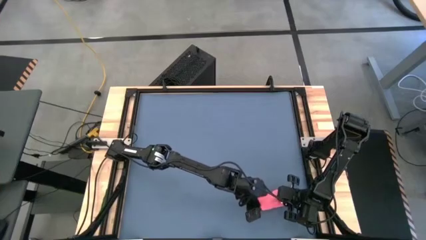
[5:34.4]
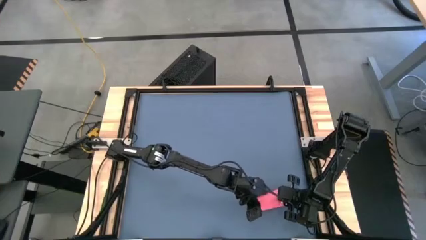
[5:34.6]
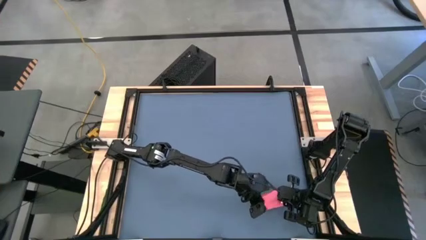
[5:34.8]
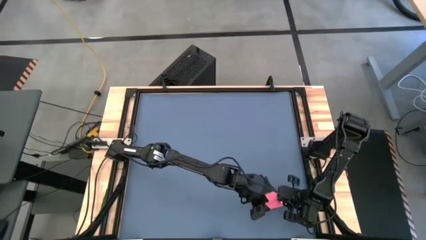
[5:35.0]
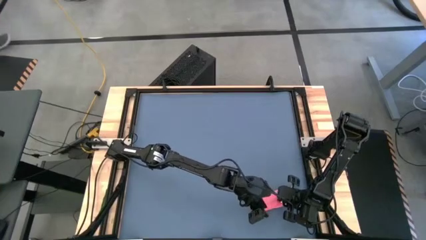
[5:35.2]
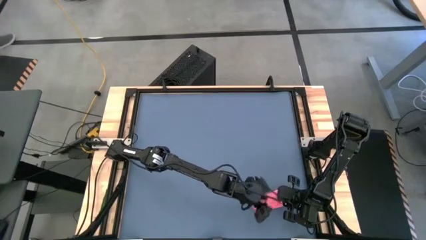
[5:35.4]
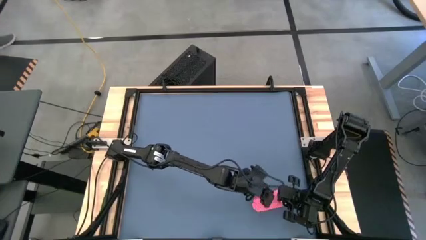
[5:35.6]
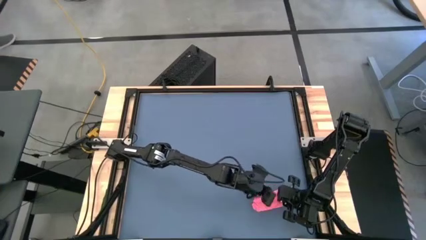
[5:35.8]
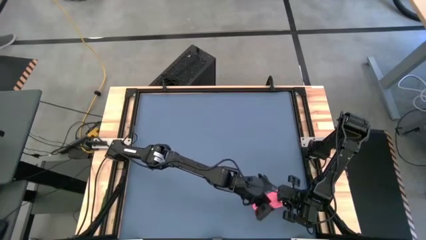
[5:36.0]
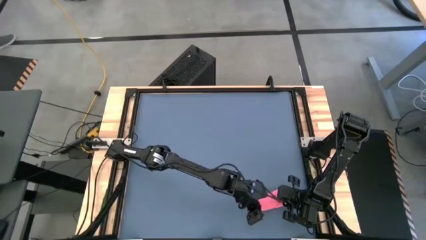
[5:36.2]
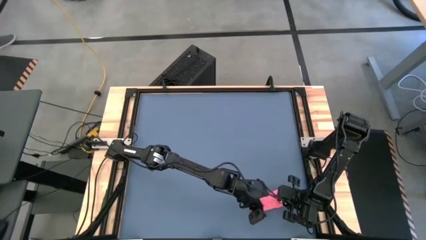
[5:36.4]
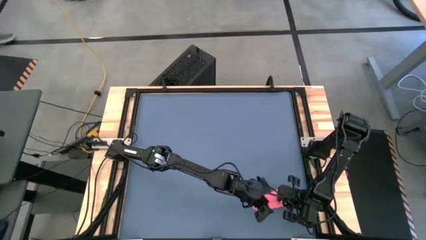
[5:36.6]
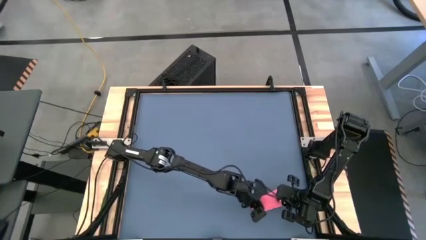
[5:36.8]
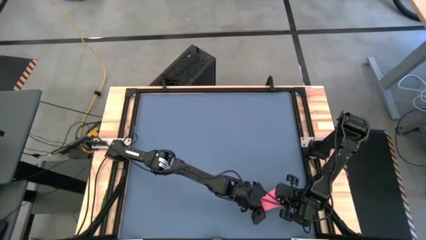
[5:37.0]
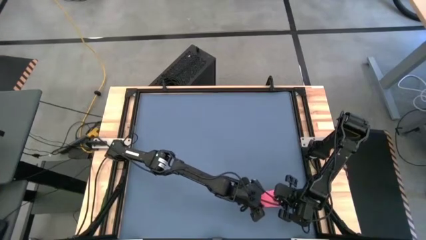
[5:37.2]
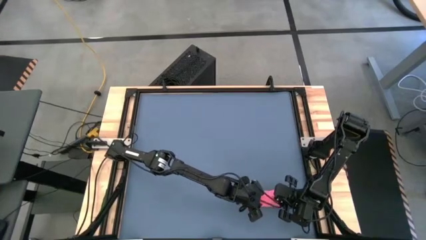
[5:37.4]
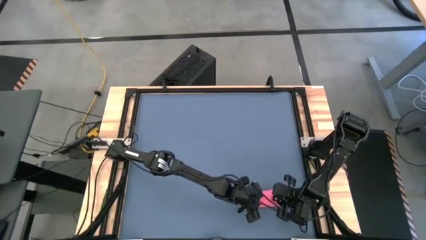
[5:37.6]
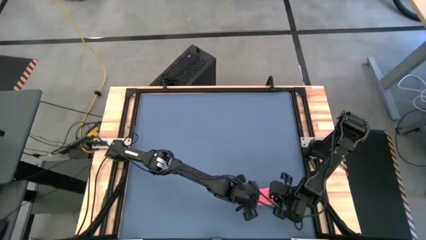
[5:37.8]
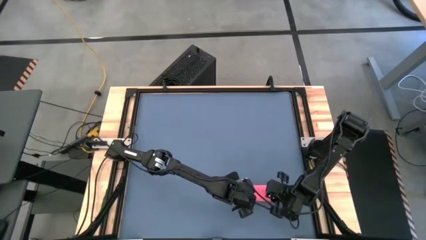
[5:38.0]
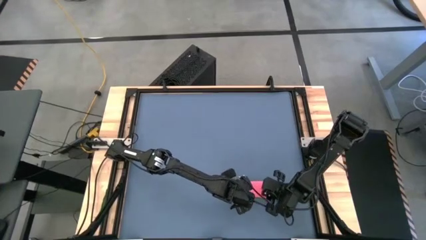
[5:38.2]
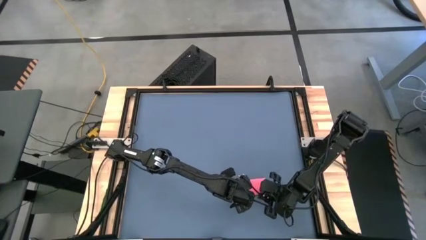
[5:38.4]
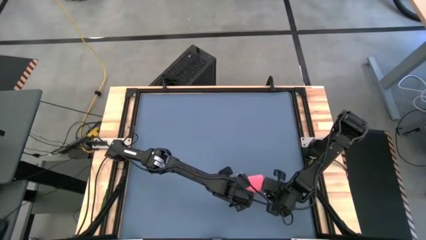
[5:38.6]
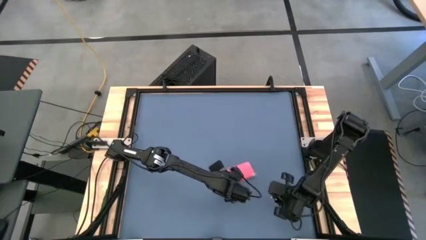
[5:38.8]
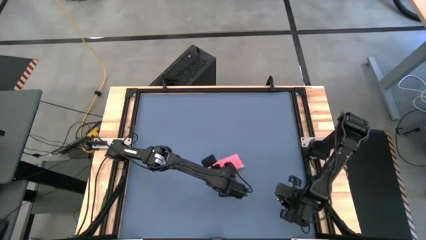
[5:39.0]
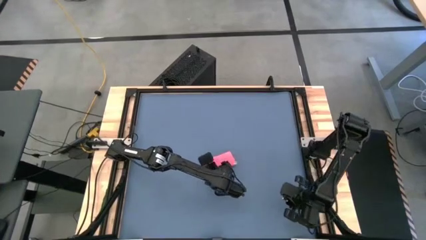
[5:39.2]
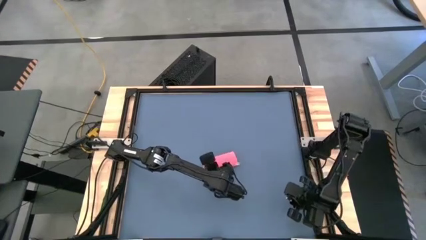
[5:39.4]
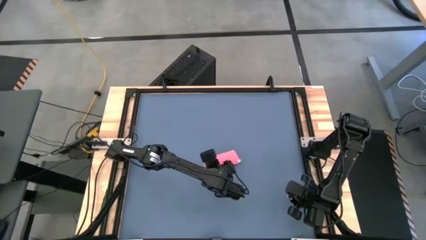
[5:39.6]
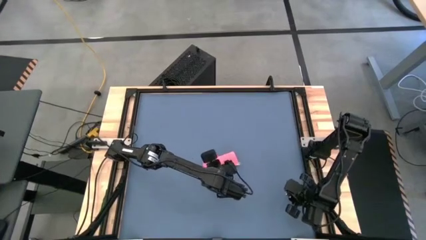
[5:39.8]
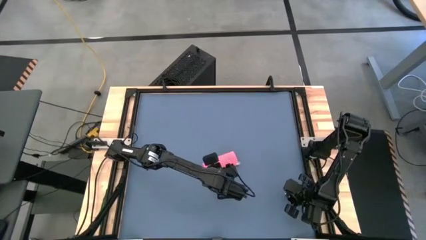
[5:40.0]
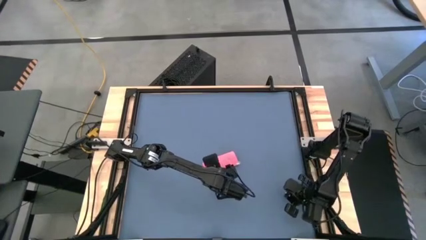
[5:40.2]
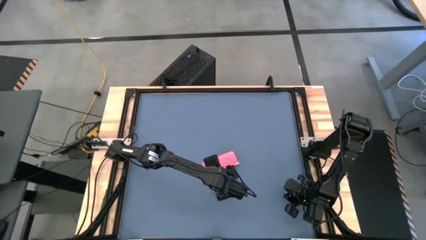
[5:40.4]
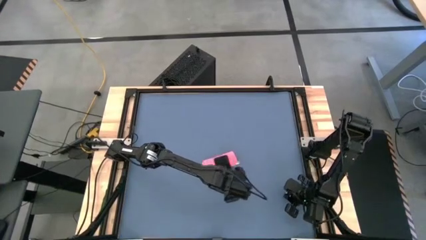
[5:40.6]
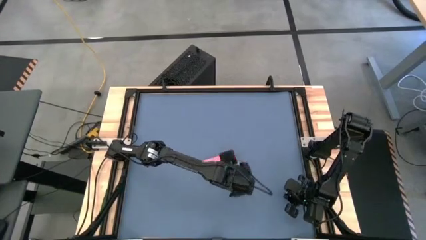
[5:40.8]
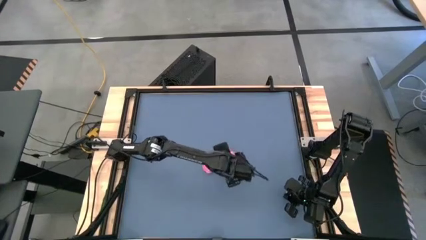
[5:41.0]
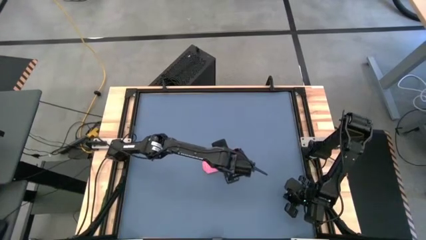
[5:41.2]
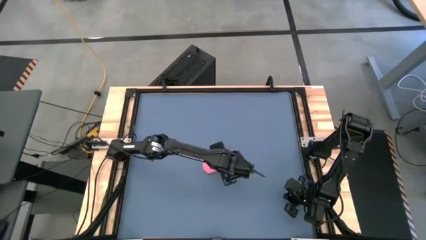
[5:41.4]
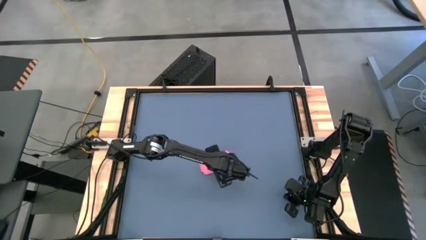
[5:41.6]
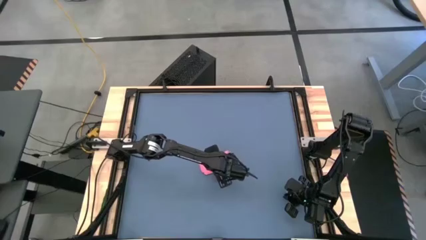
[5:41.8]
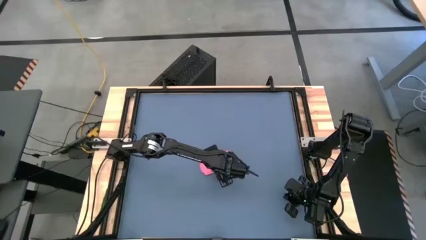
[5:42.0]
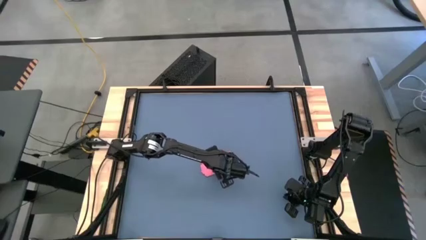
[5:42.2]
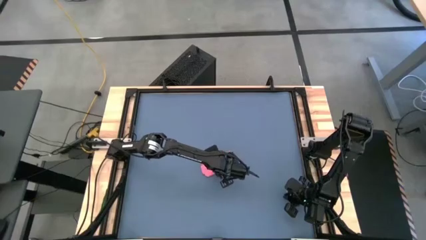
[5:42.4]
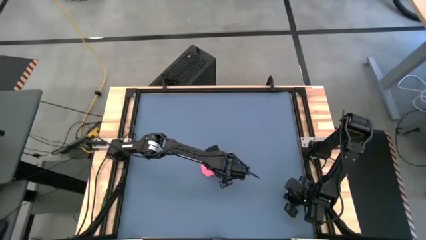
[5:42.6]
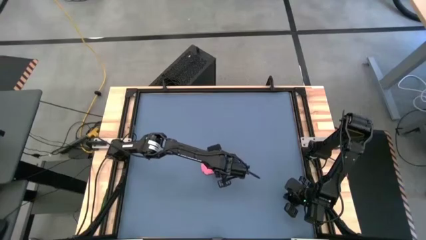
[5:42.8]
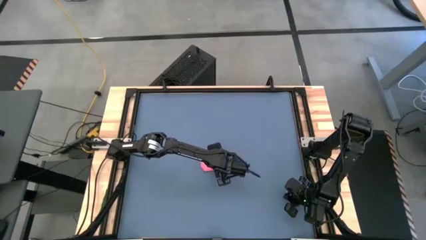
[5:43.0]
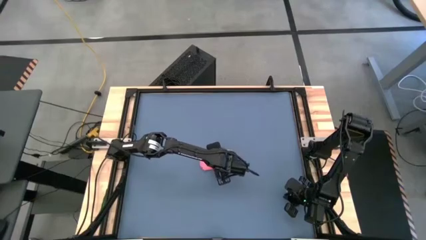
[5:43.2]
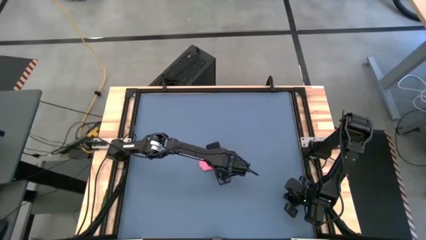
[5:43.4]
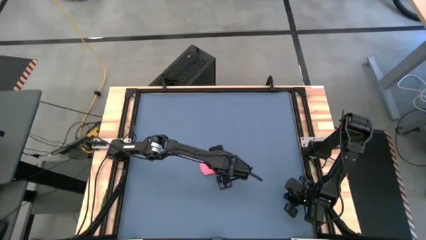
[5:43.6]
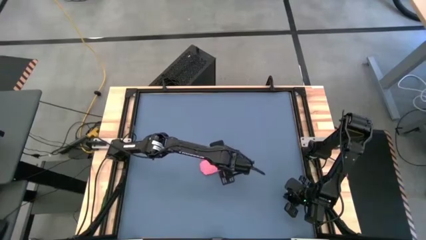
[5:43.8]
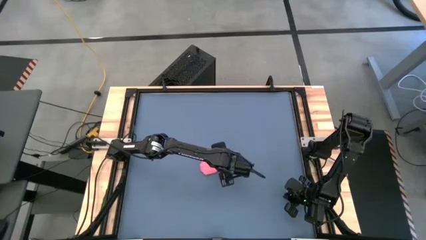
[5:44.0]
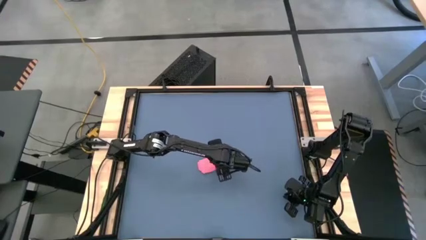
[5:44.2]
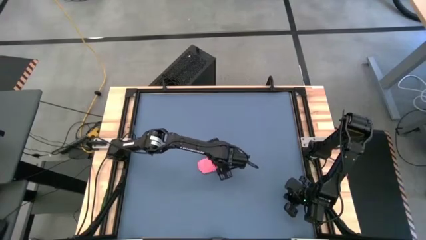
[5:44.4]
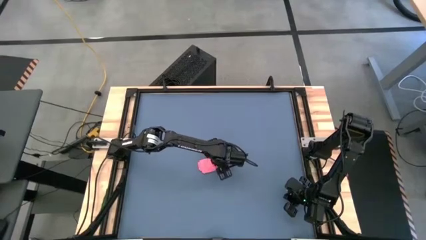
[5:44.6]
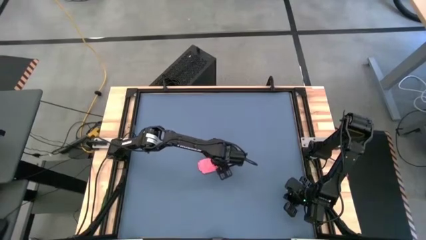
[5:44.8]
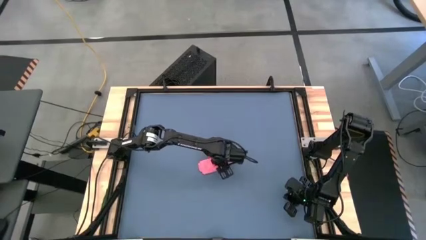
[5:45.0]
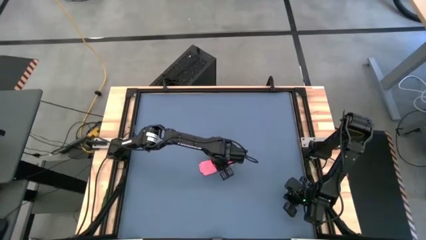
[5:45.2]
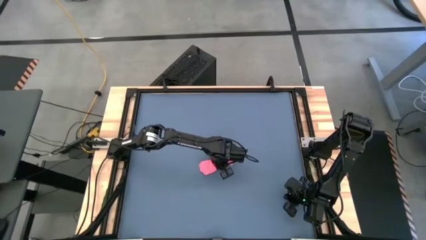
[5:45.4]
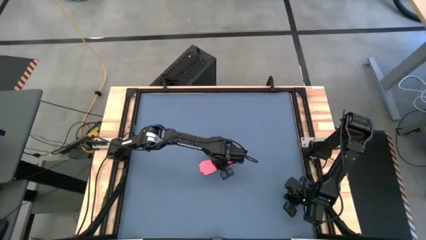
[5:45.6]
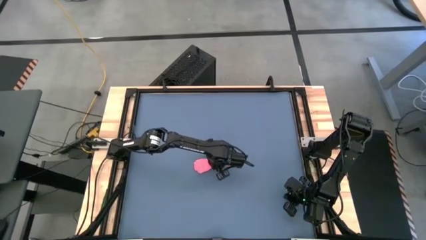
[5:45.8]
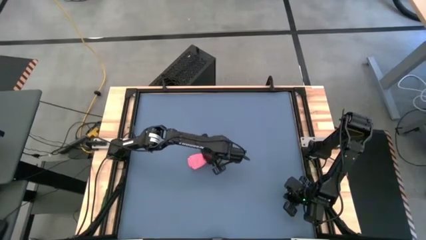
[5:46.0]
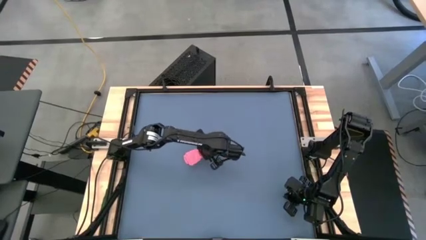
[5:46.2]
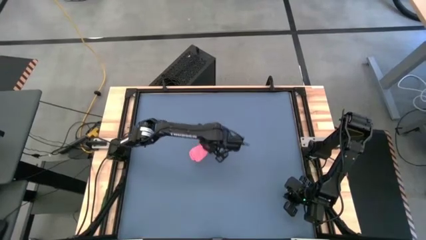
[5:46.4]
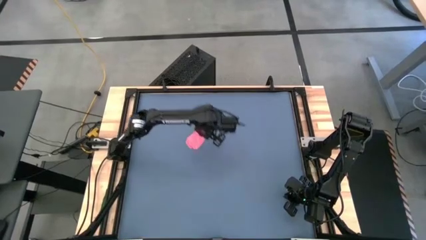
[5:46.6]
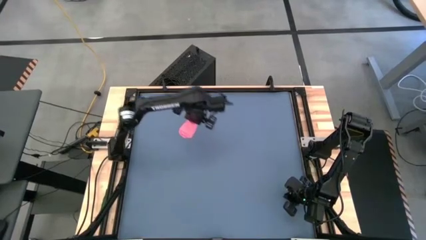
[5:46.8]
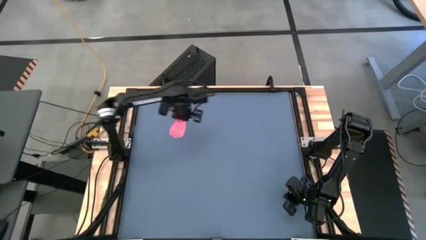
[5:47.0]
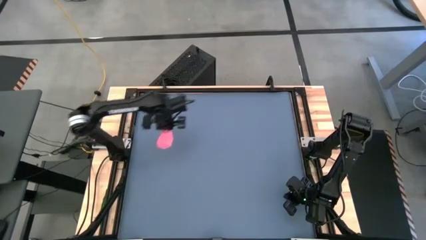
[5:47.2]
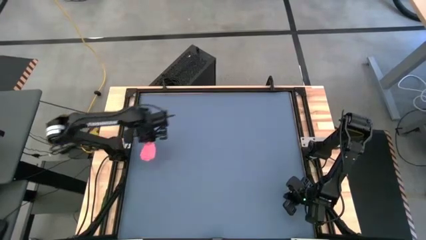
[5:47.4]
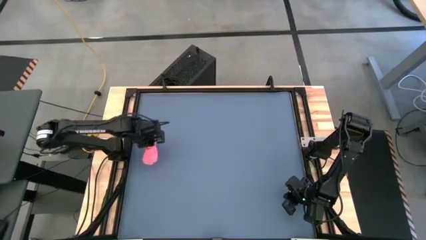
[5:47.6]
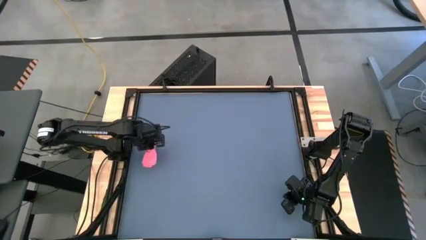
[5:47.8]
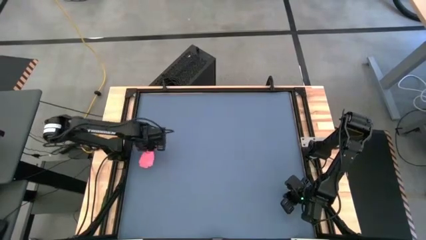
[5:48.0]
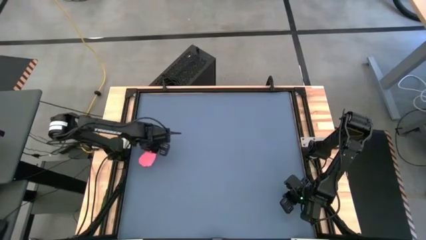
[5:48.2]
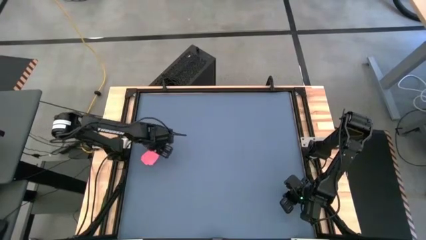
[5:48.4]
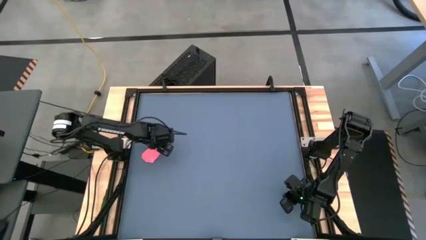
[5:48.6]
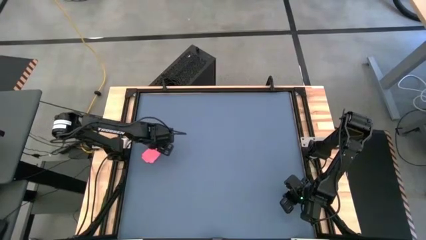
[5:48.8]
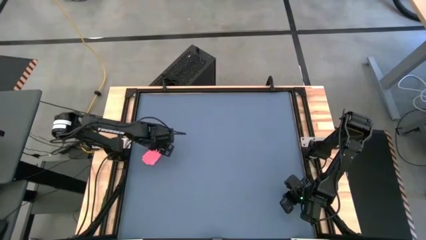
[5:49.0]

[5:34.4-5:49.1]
Task: Roll towel
Move the pink towel to the left of the table

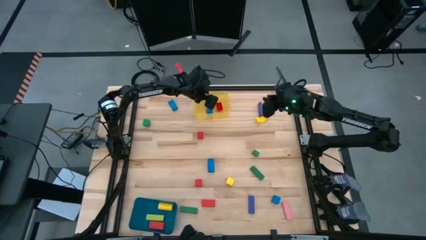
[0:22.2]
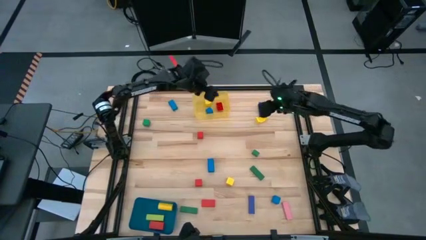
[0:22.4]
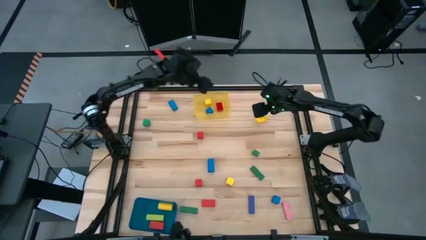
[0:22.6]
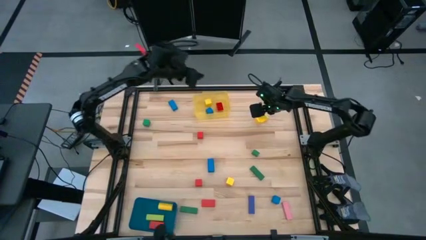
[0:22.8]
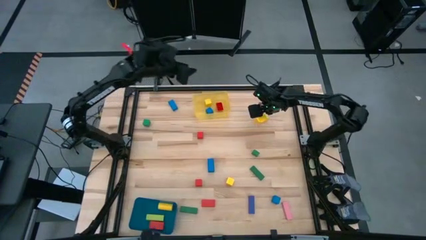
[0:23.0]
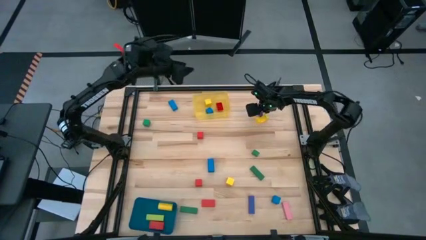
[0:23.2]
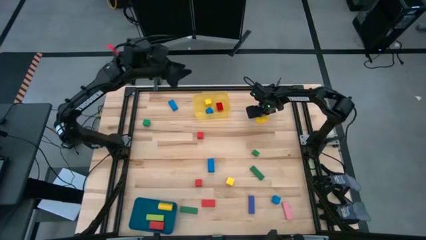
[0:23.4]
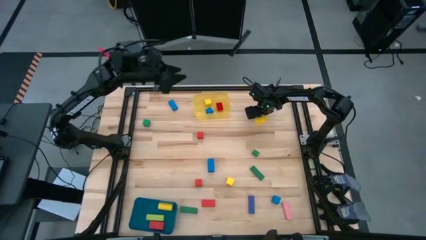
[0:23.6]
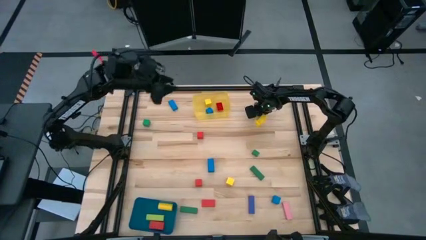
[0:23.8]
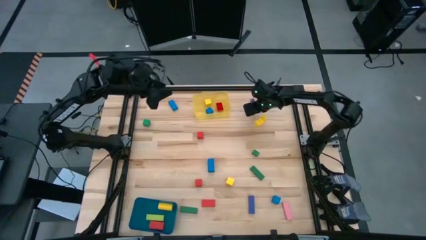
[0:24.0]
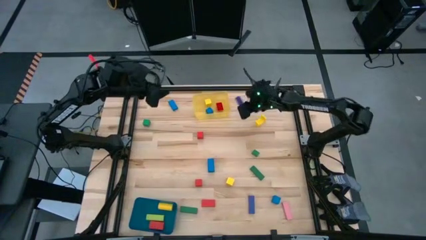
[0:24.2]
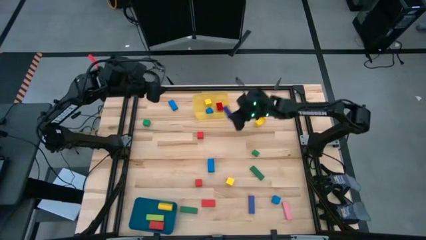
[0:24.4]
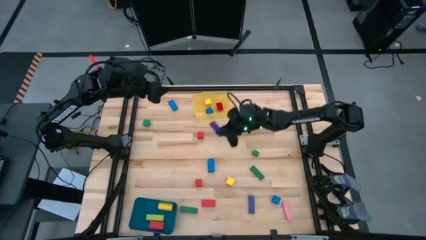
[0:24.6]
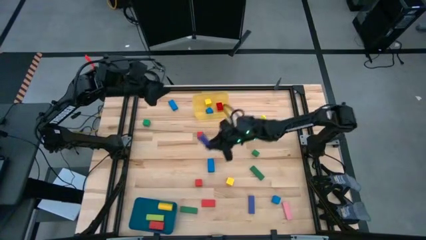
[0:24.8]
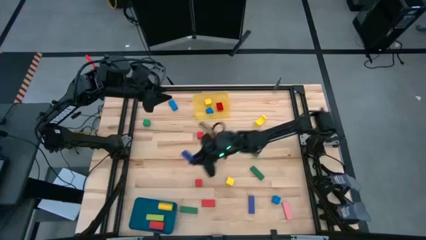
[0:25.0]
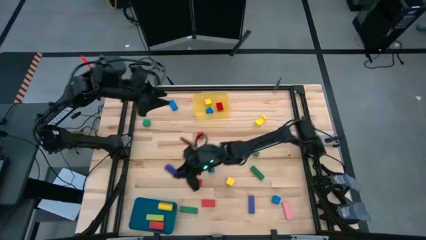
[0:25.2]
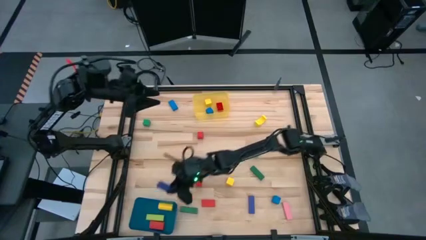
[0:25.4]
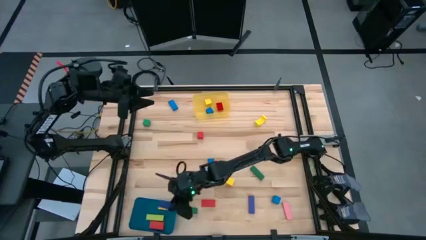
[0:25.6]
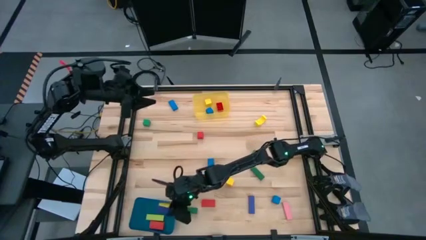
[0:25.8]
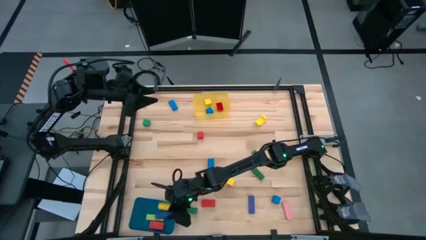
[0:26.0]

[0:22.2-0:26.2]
Task: Sort blocks by size
Put the violet rectangular block into the blue bin
